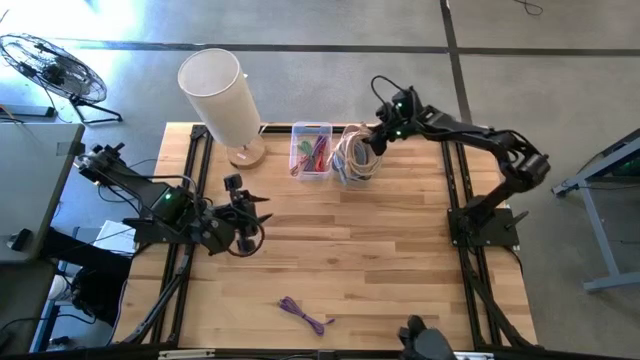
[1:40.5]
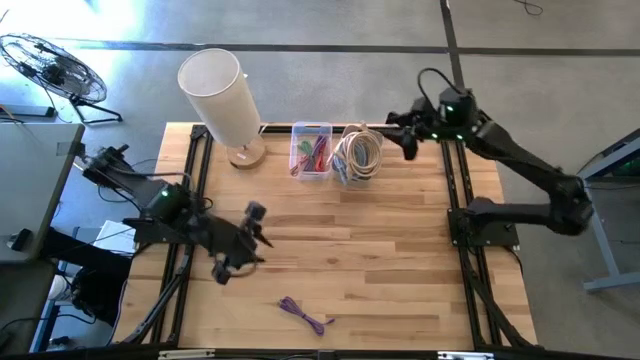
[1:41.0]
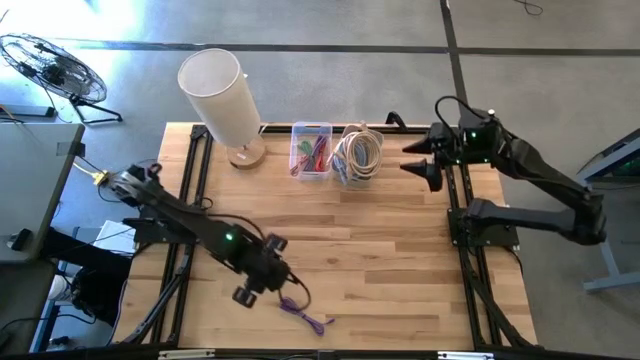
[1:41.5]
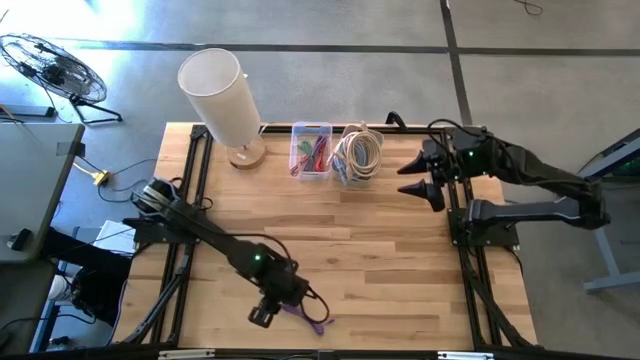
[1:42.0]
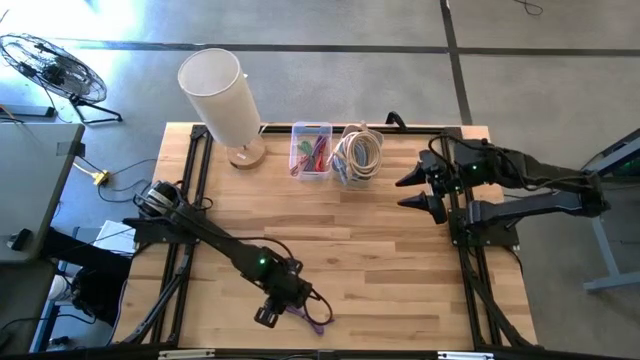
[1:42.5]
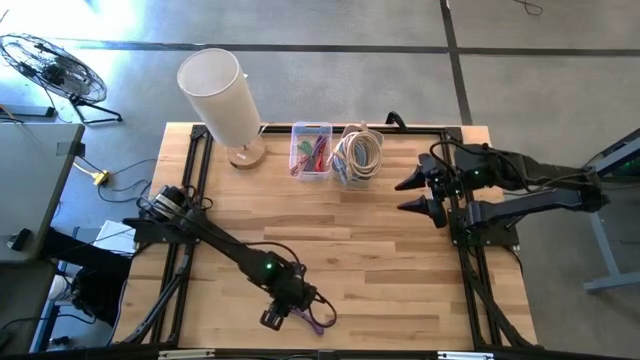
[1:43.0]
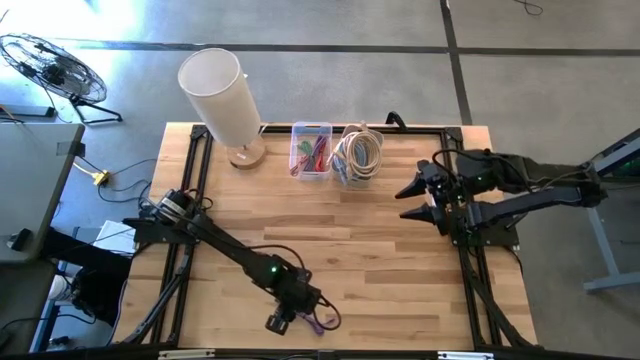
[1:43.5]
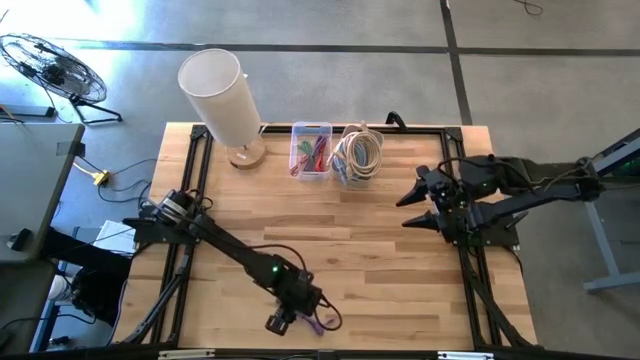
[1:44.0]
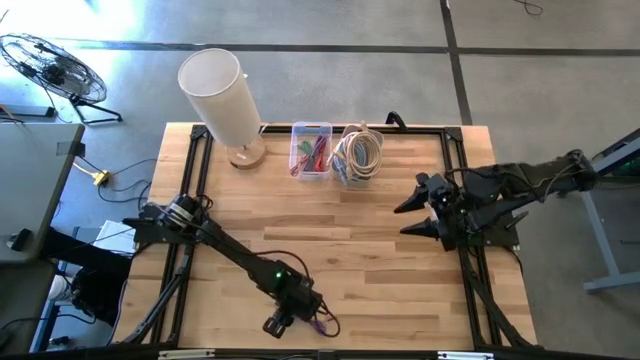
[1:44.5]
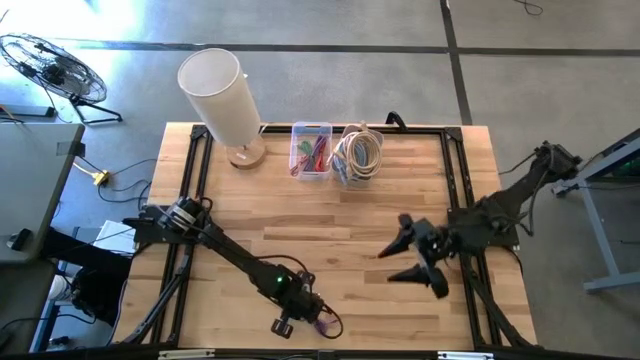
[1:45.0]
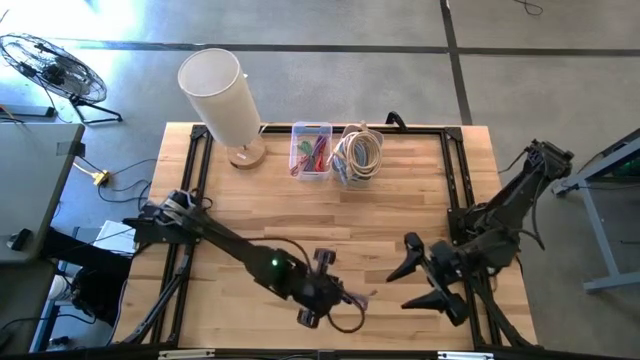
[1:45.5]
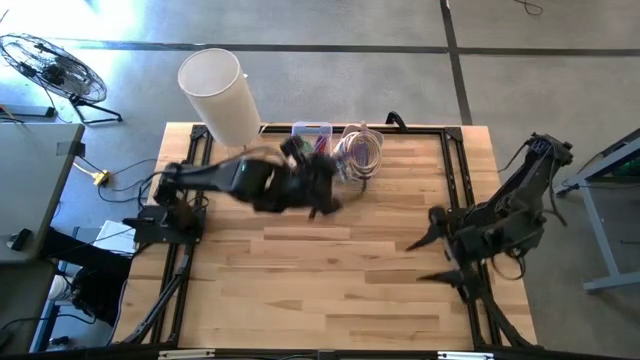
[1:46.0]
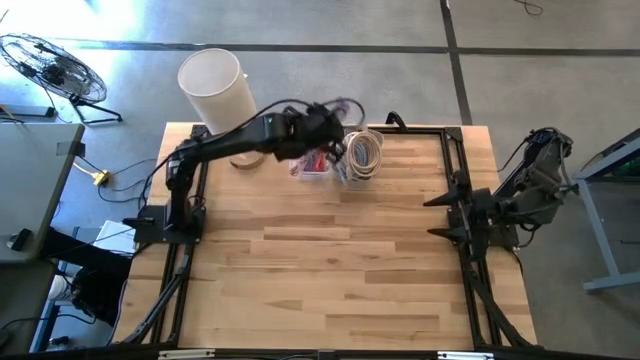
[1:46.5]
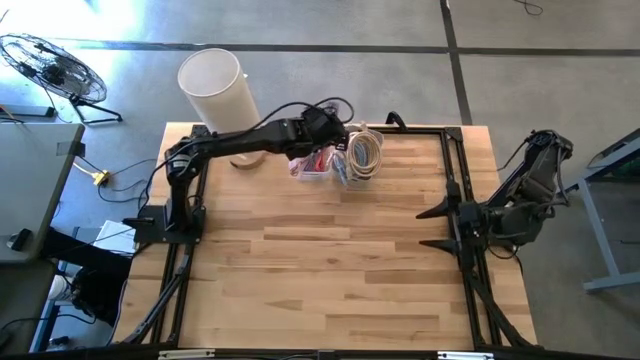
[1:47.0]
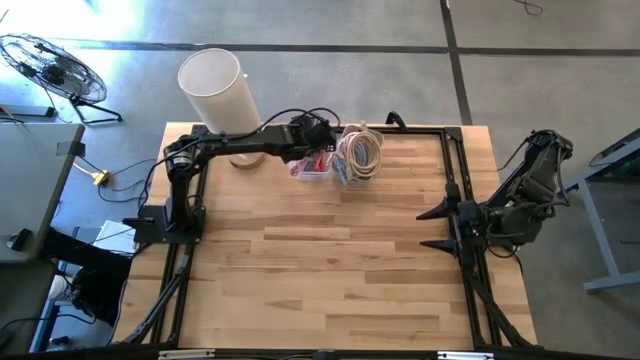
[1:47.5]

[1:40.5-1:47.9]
Task: Pick & Place USB Port
Put the violet charger cable into the transparent bin

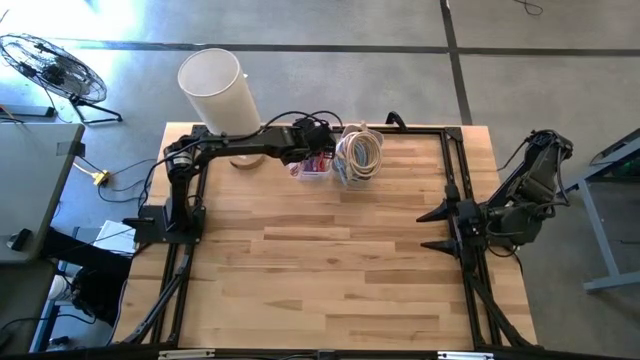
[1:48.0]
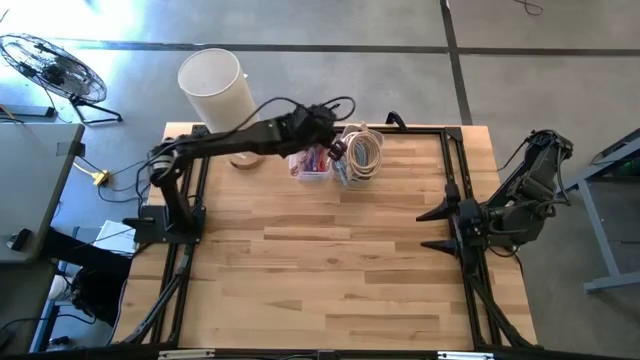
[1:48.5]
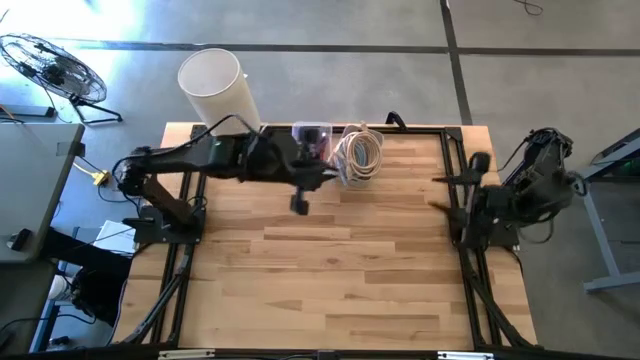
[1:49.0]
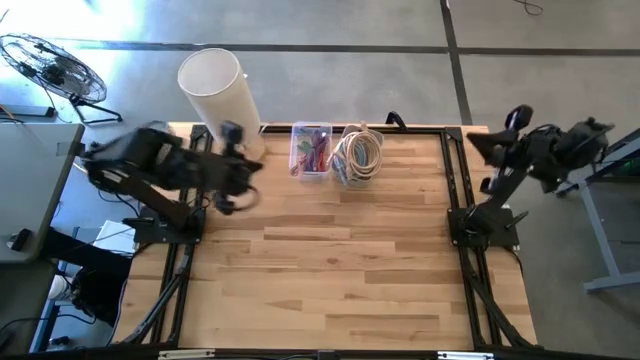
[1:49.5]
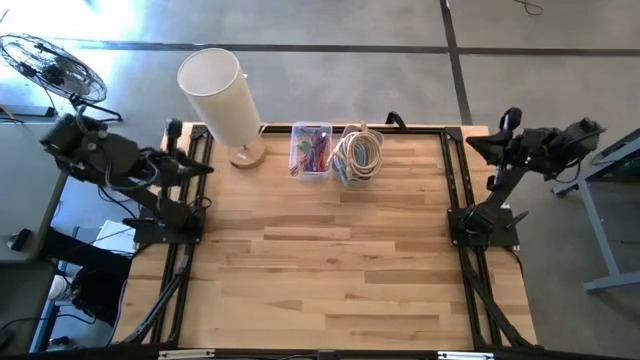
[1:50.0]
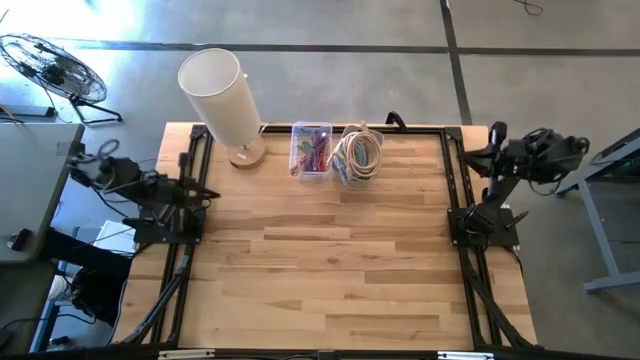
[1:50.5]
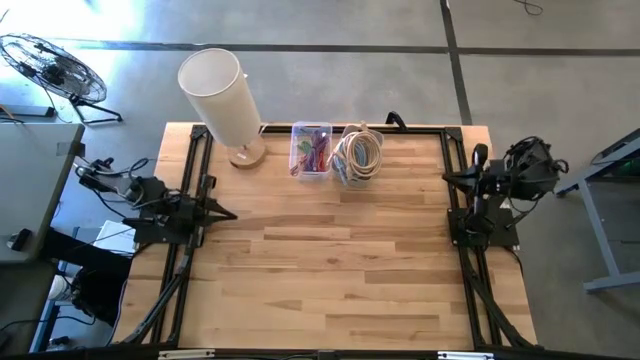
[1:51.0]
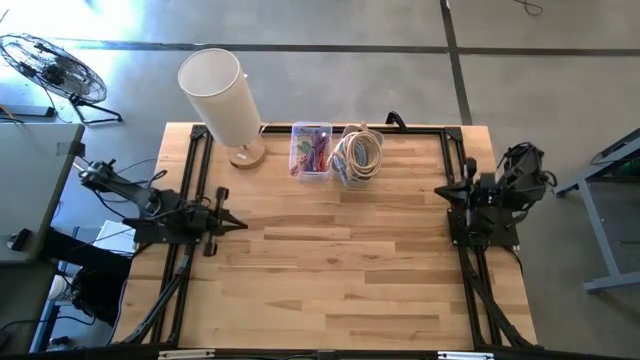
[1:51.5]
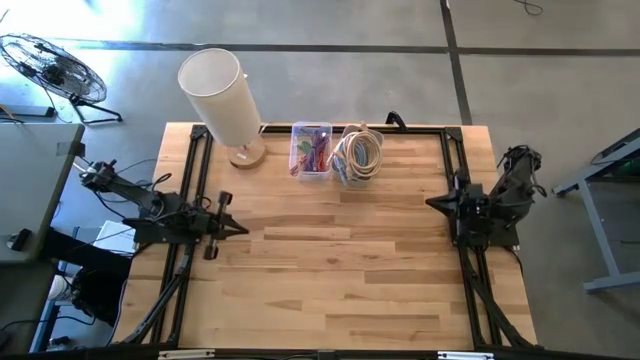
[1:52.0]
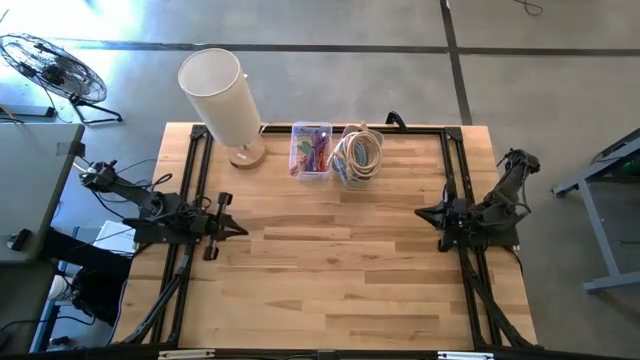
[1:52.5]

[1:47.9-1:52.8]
Return to Home Position

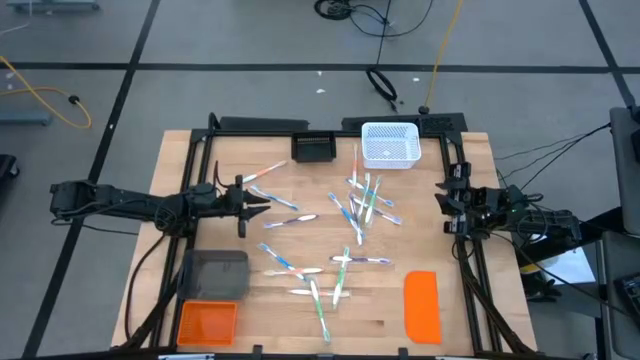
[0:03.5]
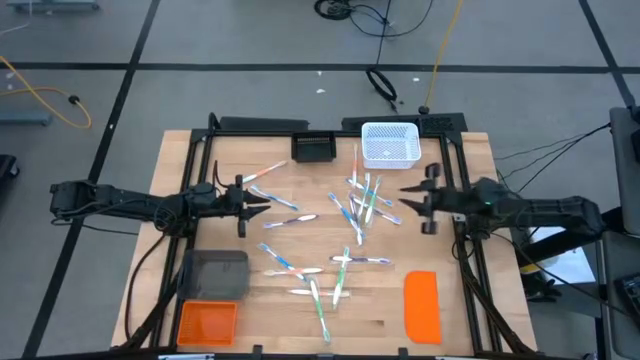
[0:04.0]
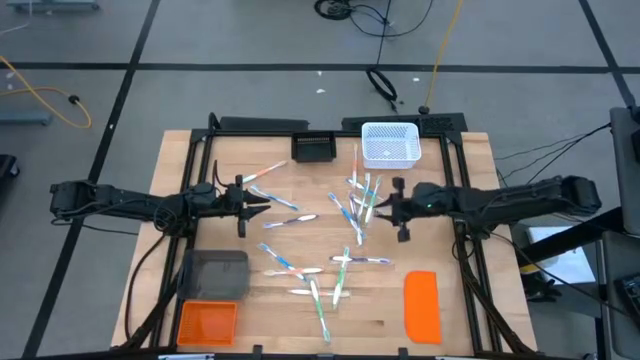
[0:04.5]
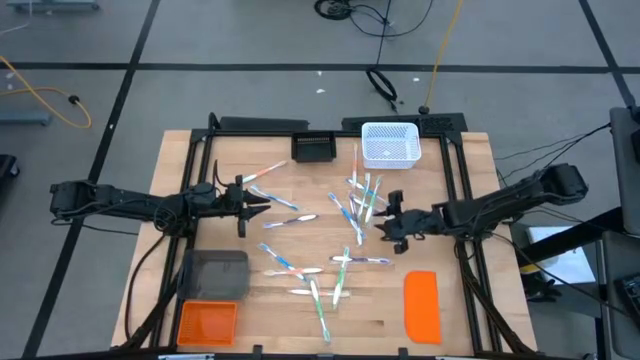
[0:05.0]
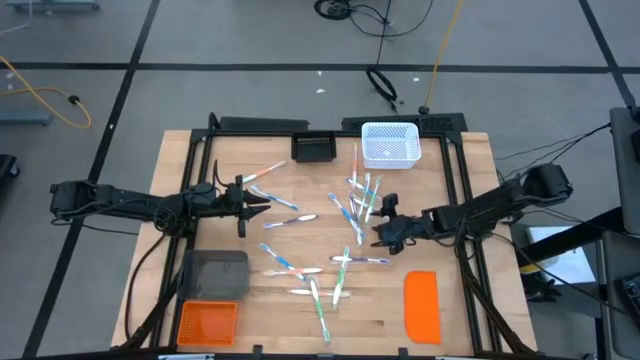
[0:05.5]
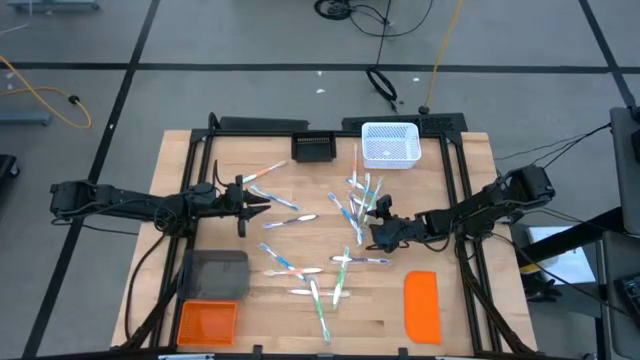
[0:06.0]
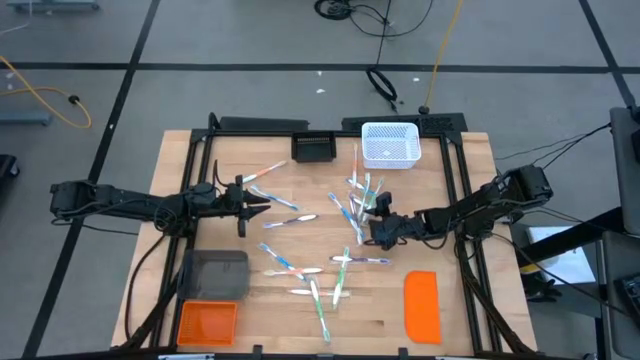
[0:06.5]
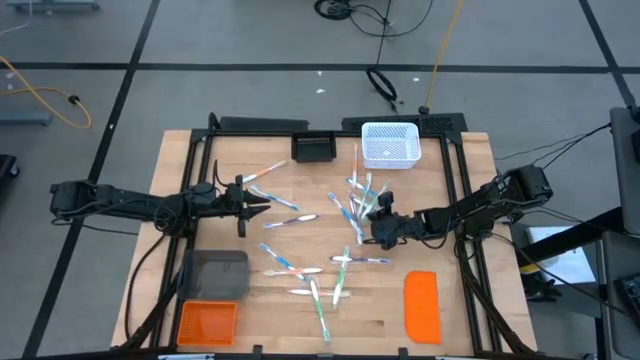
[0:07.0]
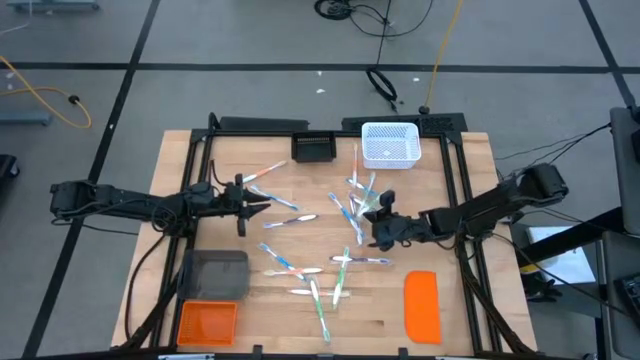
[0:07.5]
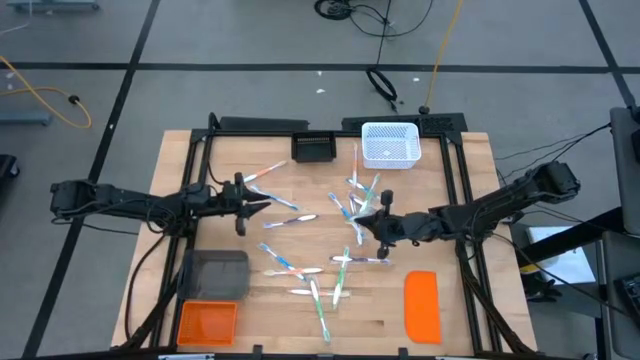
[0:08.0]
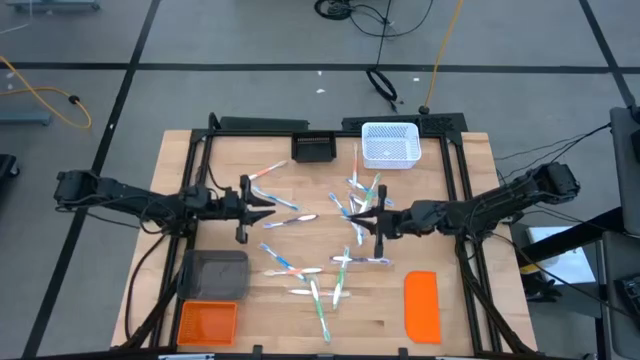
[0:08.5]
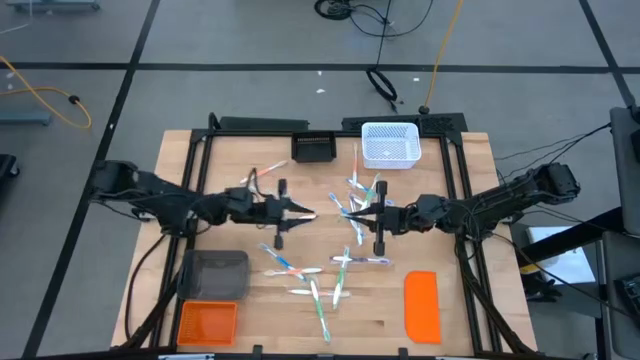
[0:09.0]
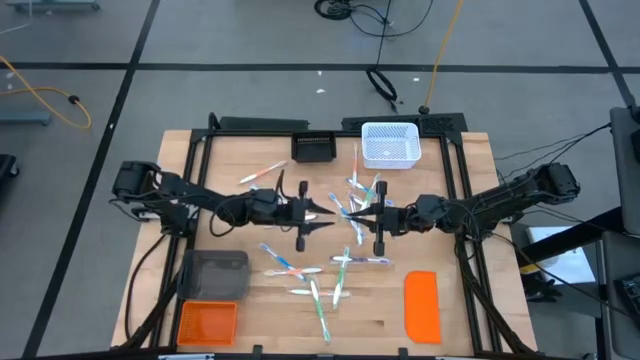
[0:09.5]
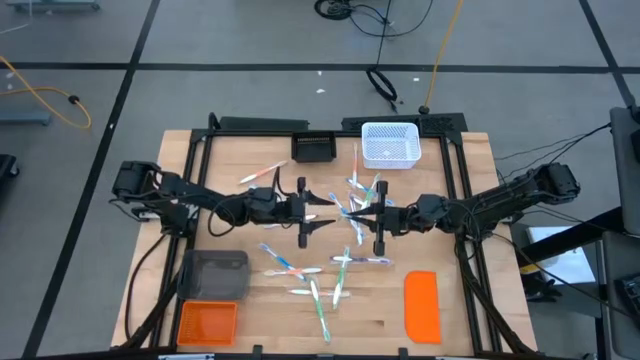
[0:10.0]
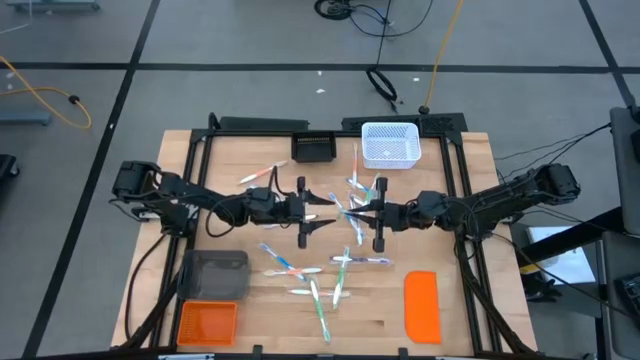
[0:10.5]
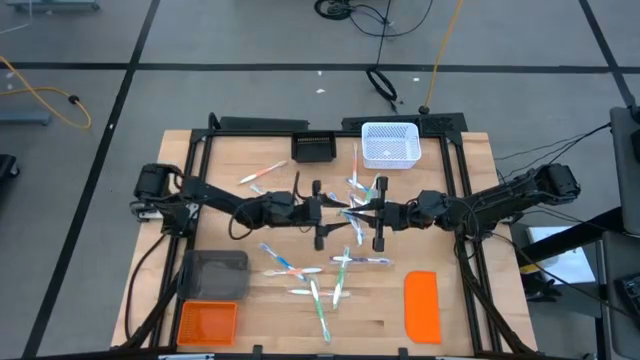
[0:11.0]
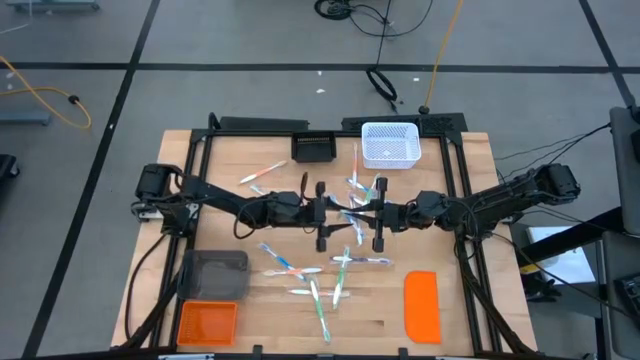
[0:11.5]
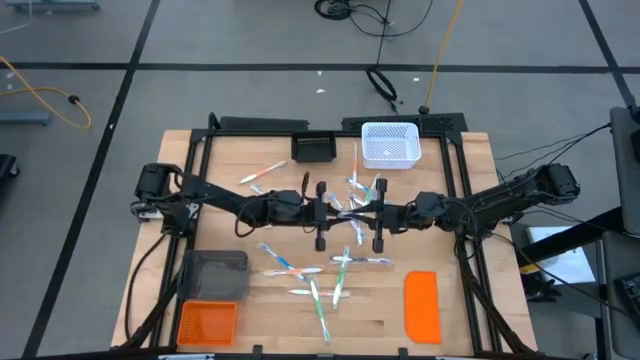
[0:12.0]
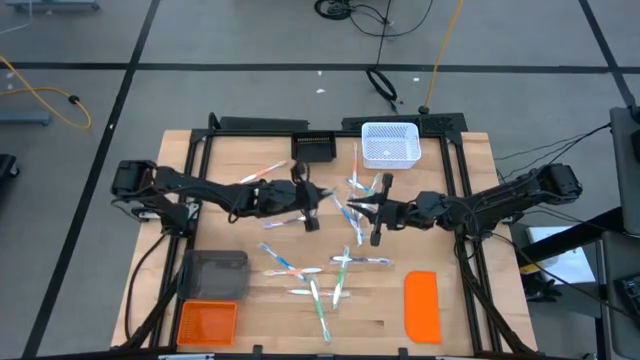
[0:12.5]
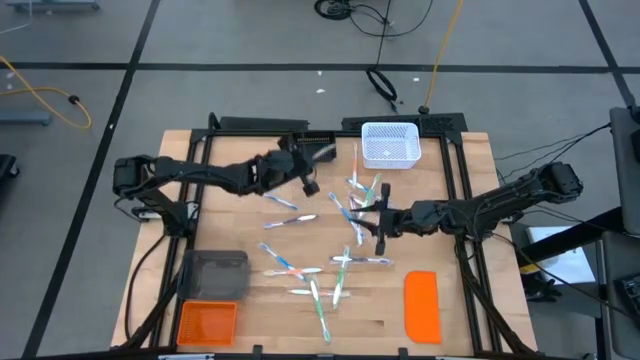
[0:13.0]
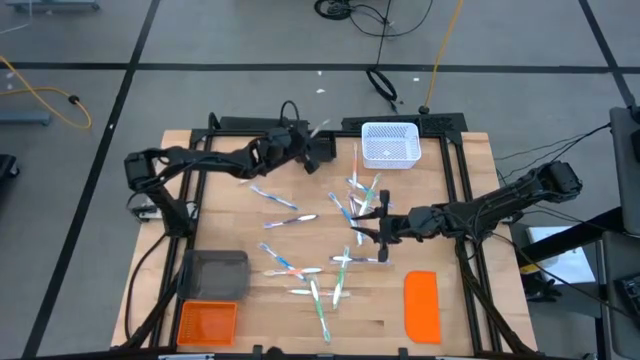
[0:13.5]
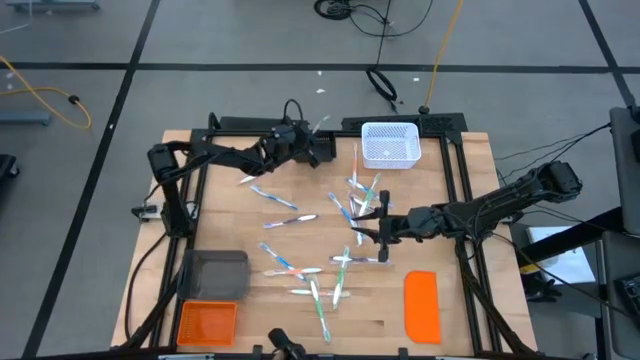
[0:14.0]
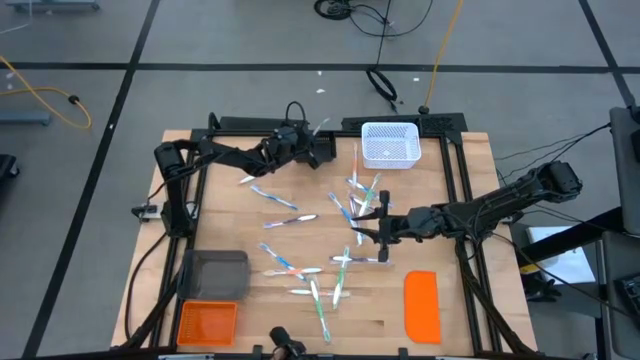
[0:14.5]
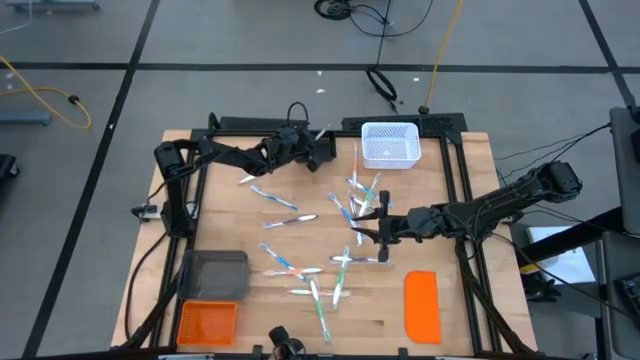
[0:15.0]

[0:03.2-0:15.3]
Task: Pick & Place Toothbrushes
Put the green toothbrush into the black bin
